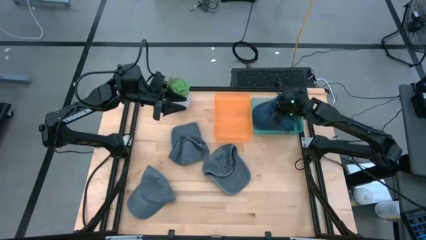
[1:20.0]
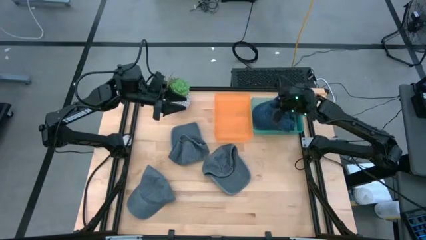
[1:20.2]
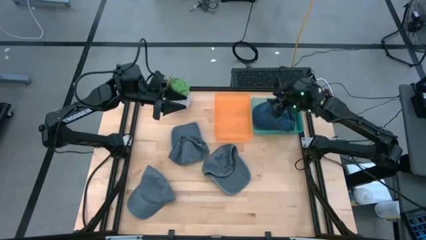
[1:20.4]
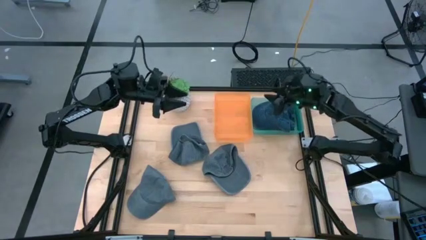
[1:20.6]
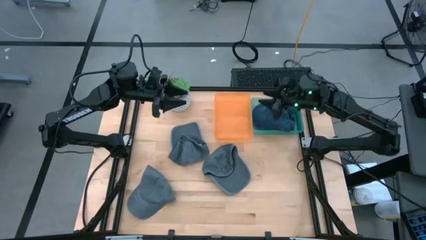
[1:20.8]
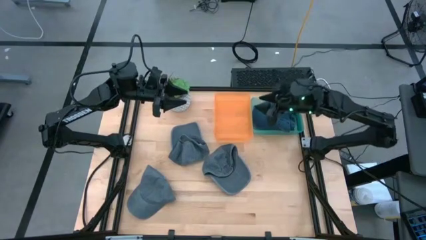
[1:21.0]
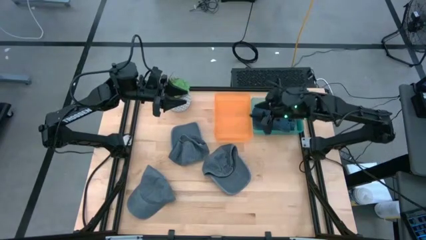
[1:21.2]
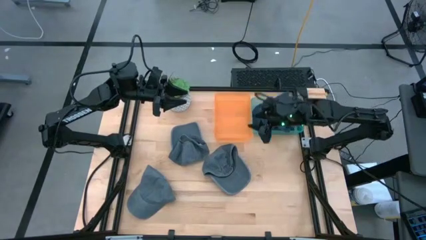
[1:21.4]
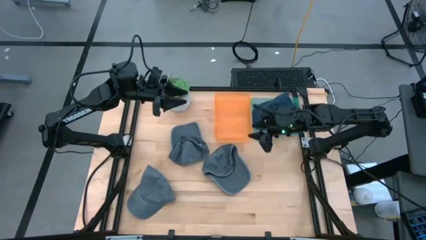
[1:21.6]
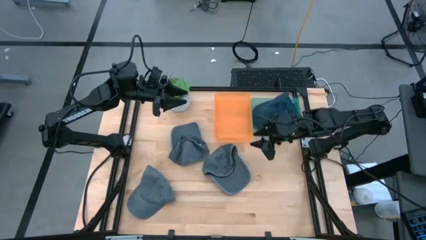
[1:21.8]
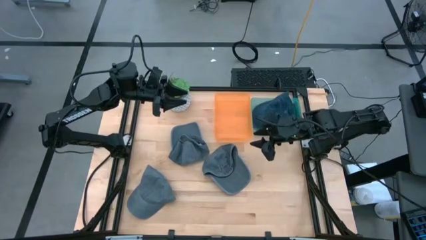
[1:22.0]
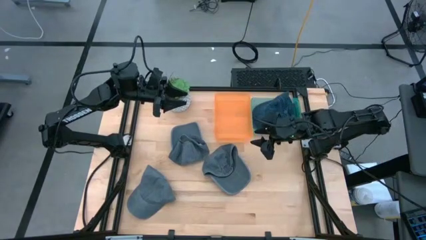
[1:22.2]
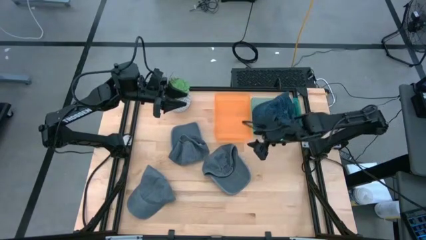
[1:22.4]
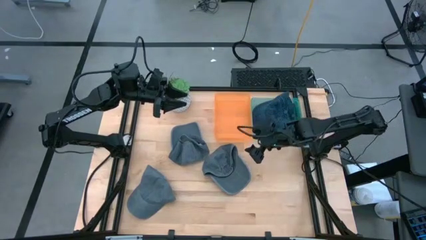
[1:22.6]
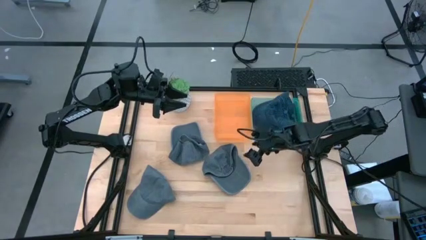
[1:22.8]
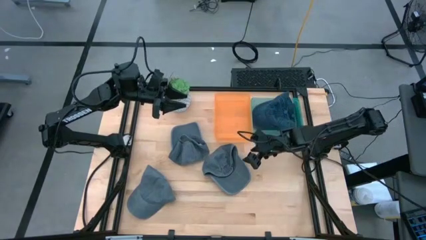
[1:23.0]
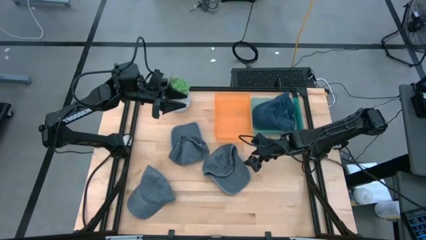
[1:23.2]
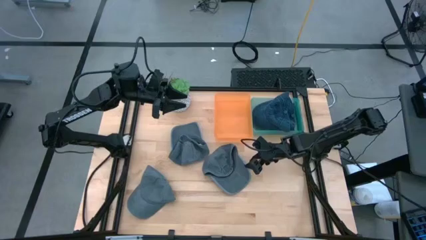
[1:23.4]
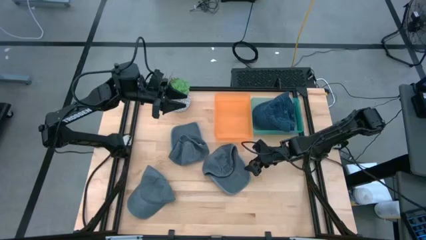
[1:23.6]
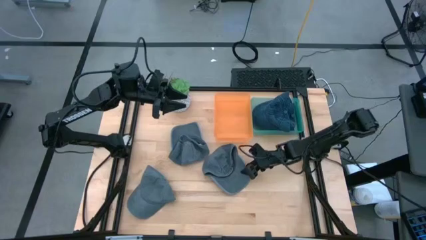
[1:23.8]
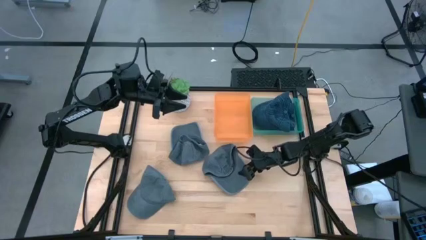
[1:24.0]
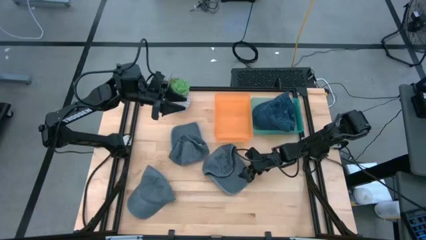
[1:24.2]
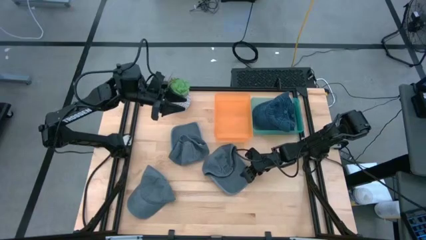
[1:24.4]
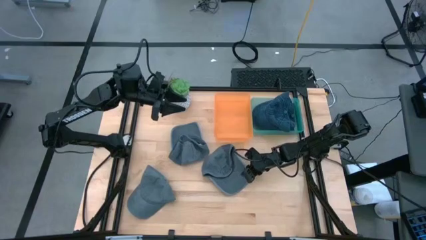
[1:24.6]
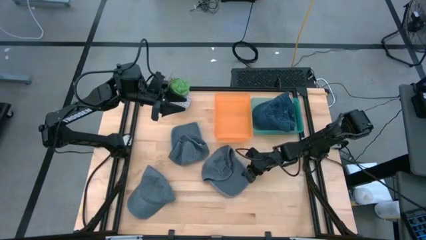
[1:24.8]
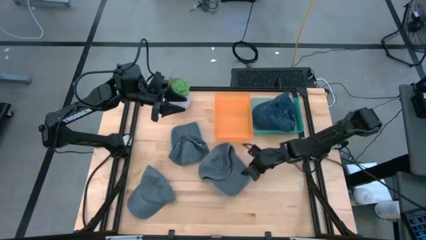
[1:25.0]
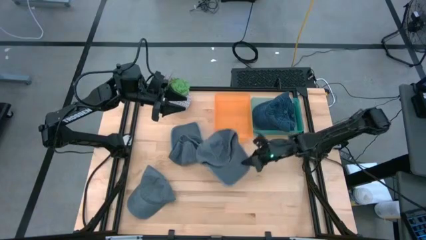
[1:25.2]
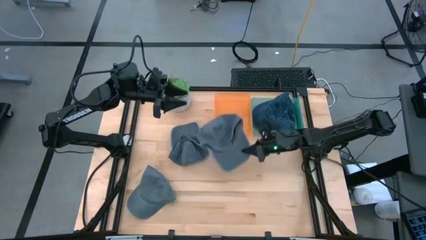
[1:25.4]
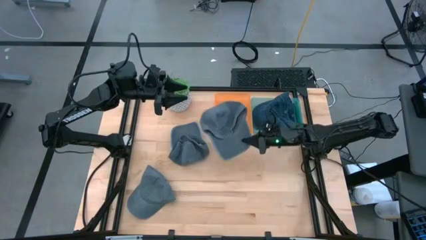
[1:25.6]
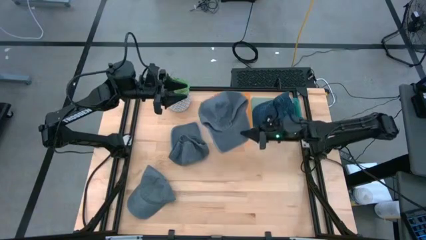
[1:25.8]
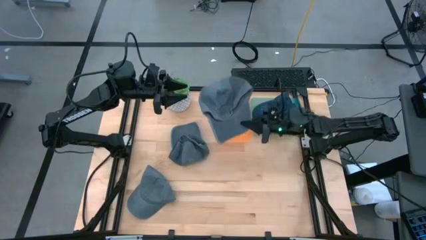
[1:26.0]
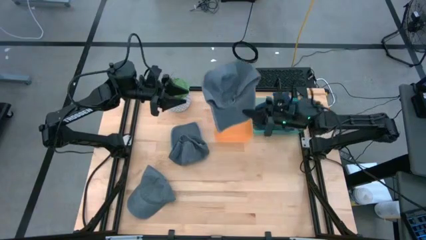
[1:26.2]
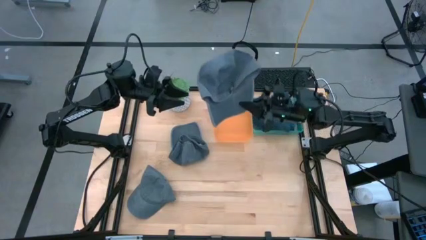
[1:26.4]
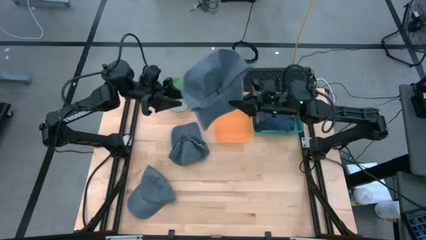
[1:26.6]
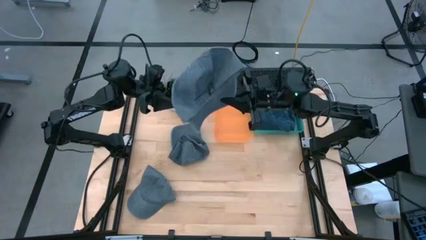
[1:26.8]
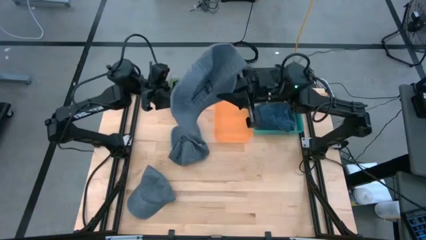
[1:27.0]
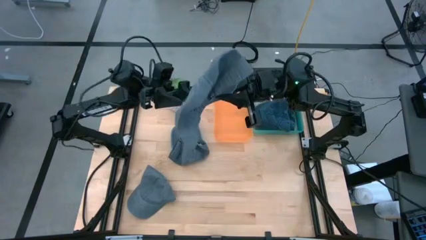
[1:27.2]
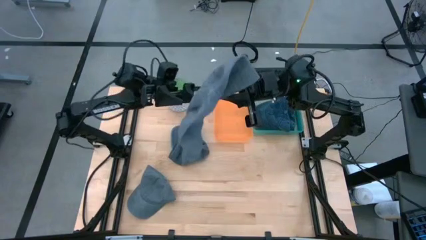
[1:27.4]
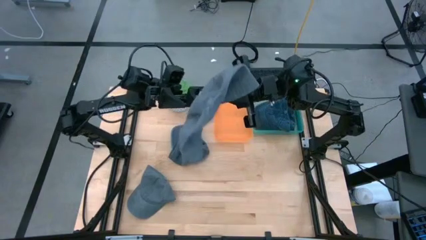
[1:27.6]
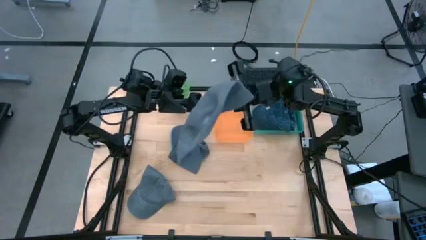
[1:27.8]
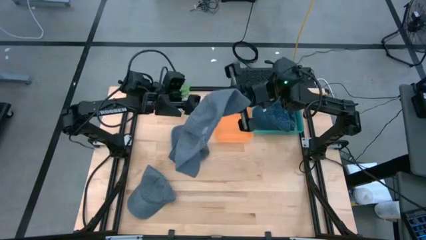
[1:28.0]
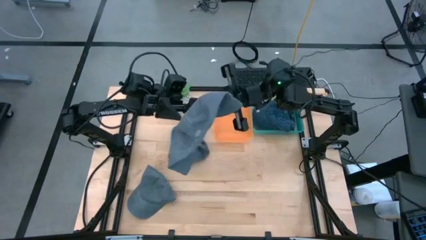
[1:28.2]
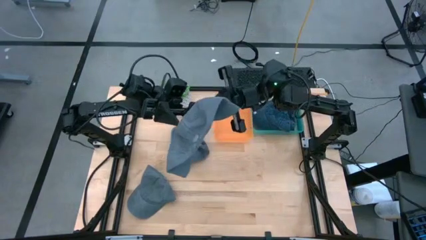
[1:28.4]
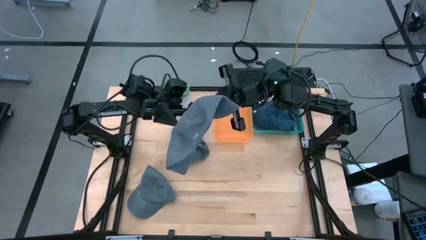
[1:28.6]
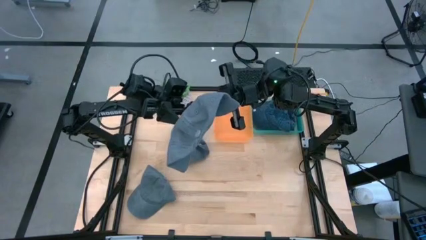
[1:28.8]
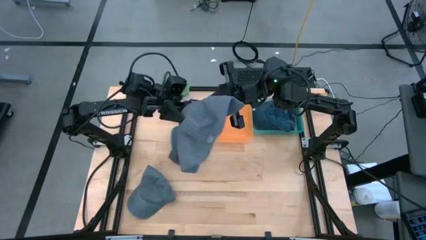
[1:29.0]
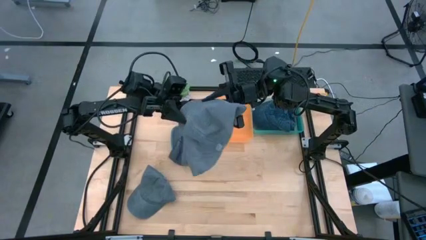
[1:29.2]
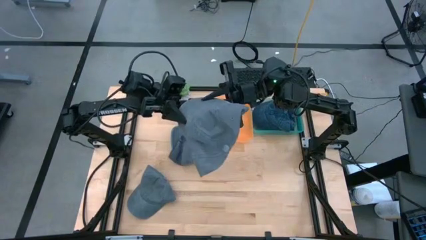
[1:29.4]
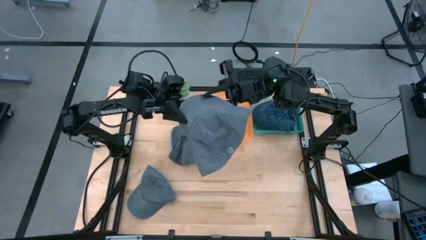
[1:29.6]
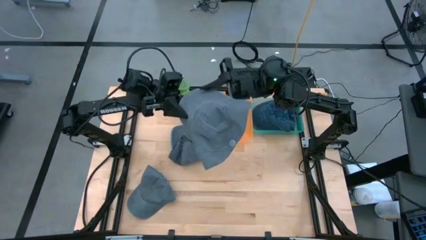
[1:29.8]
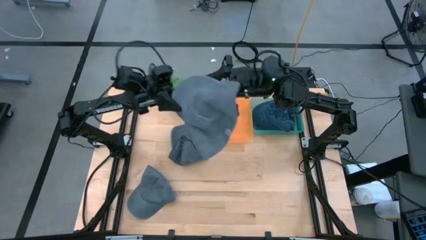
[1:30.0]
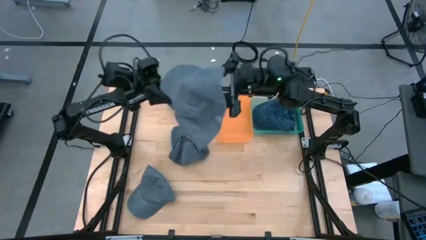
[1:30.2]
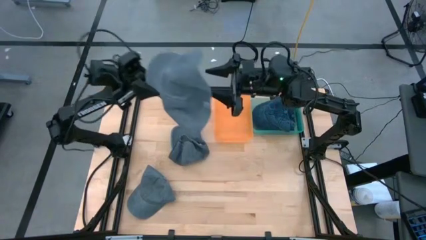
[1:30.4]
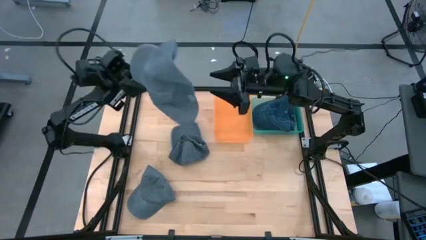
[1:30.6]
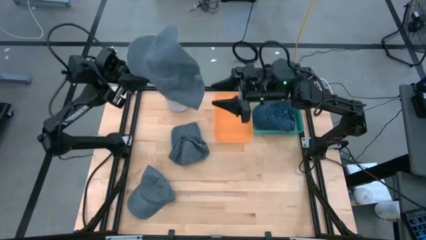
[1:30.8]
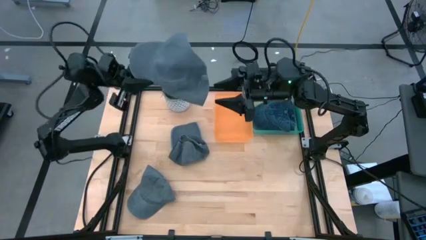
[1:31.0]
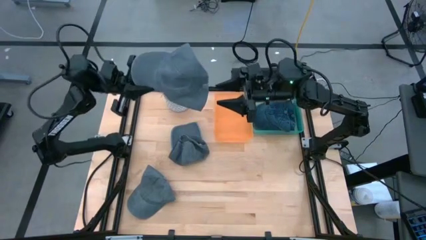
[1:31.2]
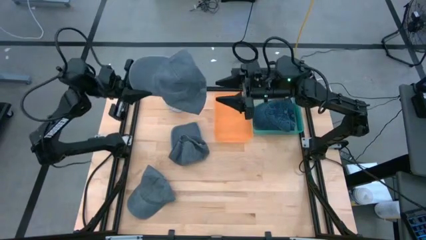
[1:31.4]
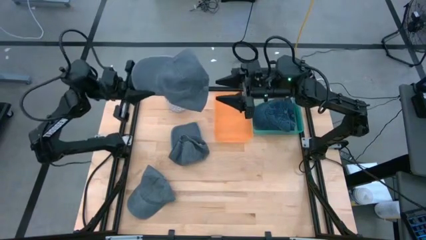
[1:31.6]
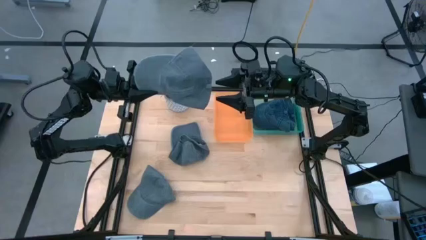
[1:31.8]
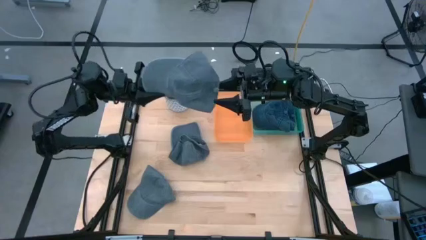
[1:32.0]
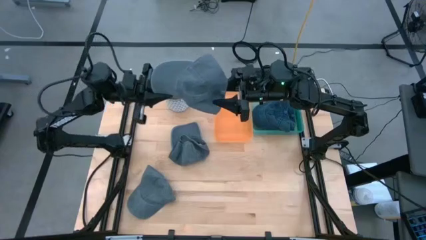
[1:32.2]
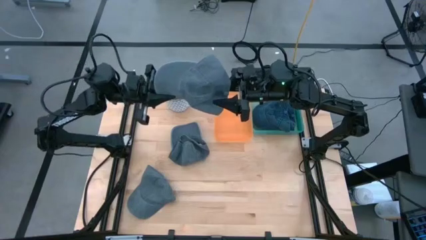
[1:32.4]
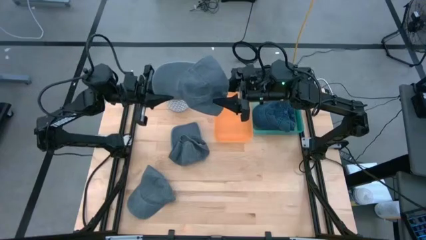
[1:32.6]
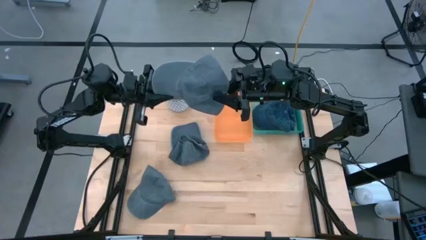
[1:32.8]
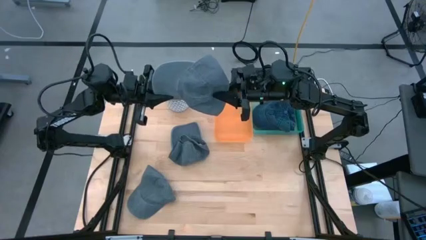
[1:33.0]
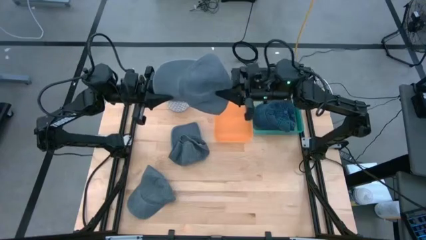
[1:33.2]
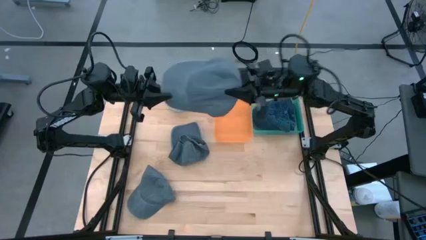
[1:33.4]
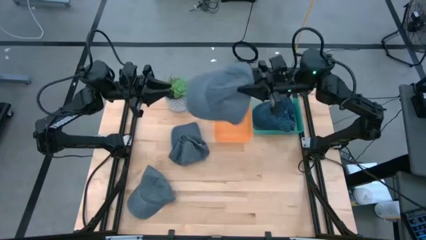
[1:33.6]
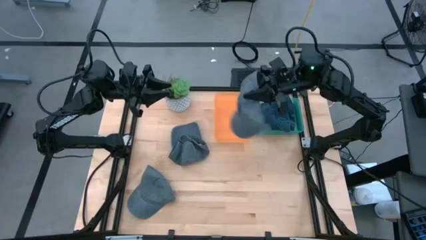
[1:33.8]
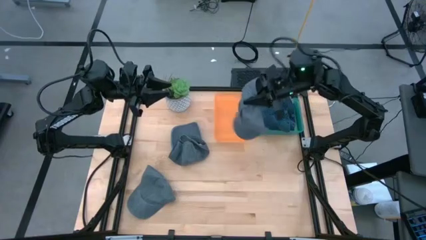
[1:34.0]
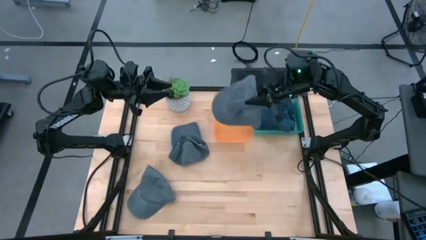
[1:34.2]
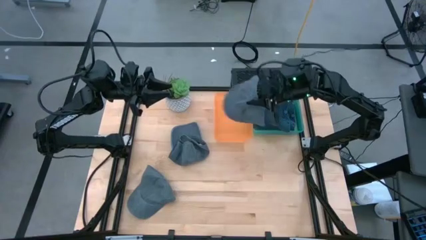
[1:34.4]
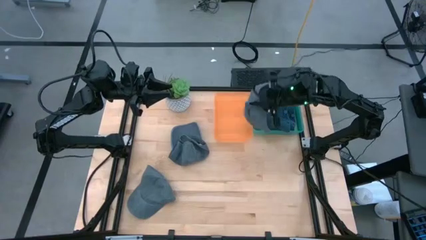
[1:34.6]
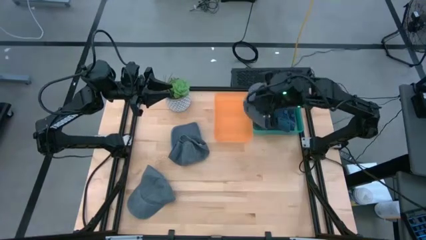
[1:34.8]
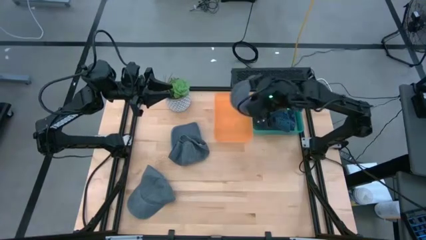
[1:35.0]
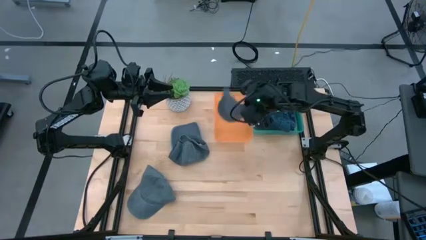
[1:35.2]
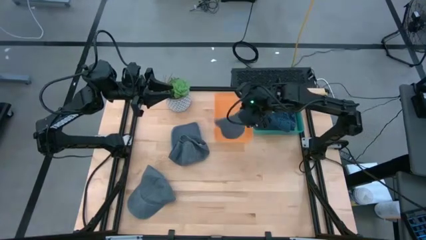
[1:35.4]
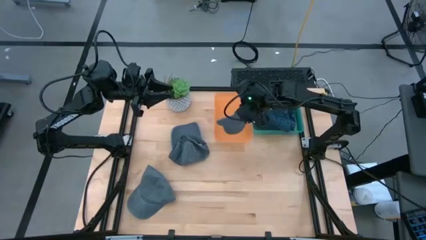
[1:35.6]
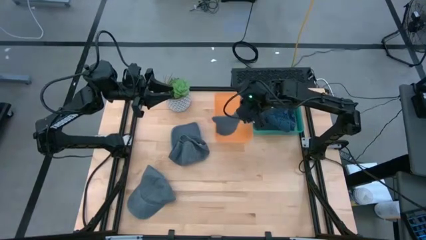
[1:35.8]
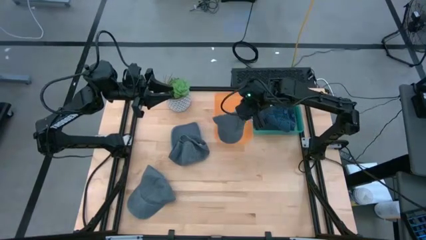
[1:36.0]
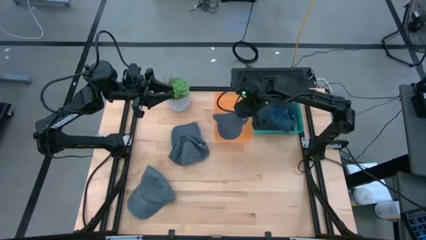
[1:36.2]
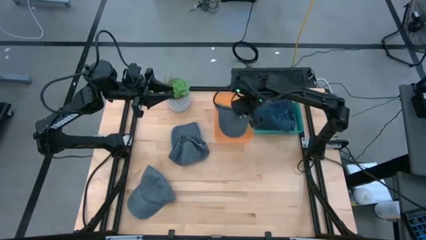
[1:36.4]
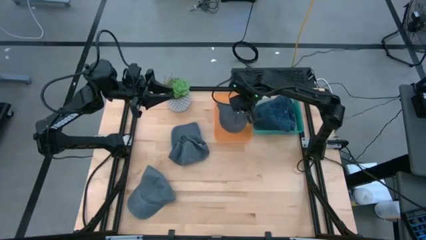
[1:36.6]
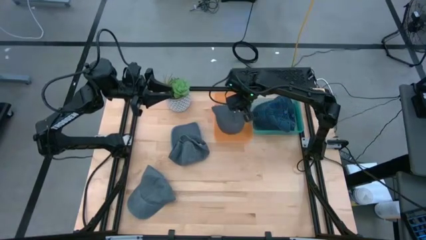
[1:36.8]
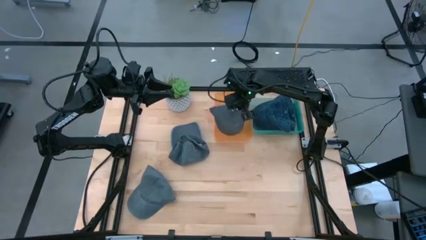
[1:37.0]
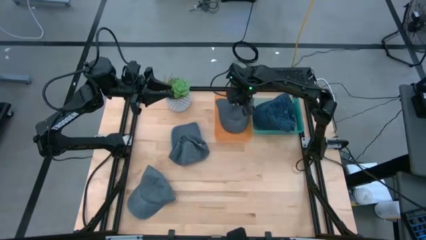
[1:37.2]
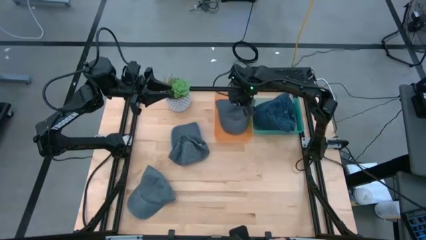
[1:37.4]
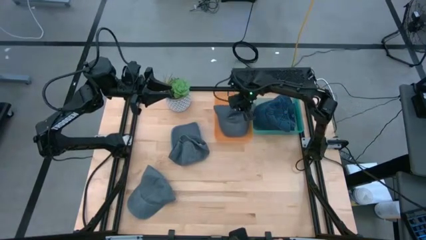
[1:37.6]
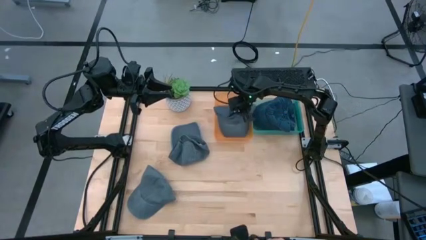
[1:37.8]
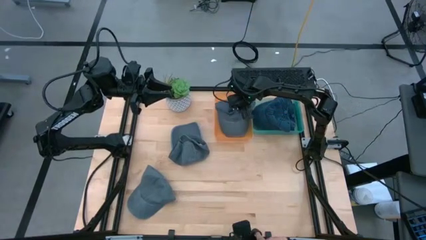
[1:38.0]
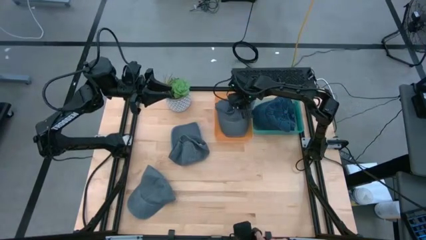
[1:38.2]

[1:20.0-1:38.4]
Task: Pick & Place hat
Put the bottom right gray cap in the orange bin
